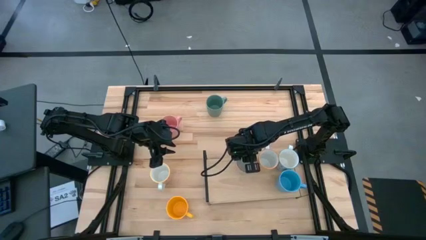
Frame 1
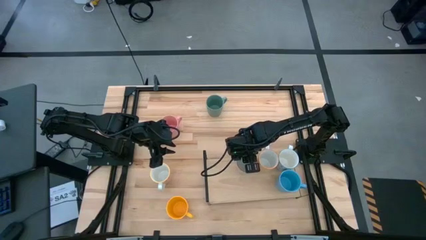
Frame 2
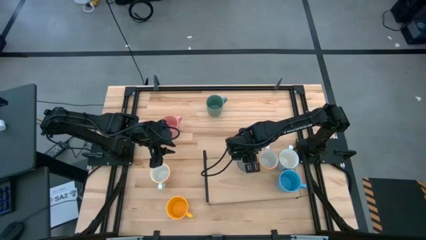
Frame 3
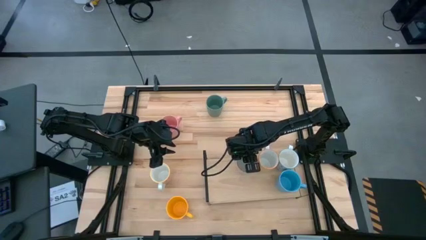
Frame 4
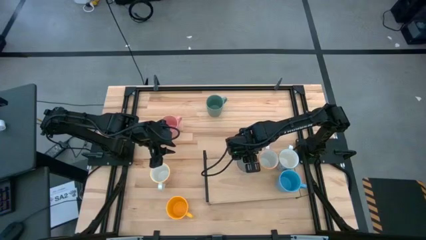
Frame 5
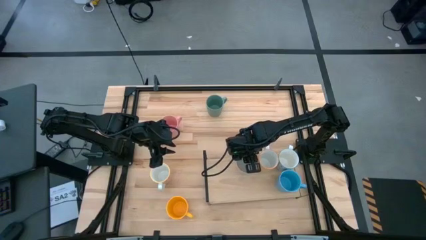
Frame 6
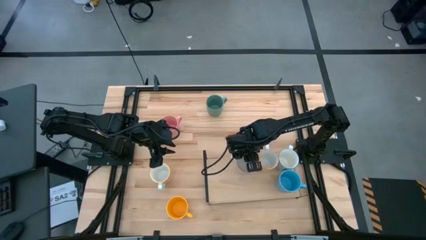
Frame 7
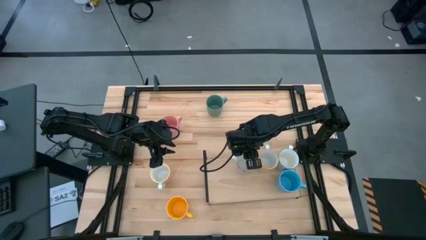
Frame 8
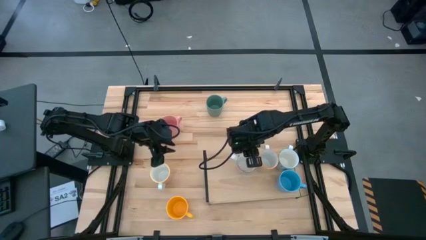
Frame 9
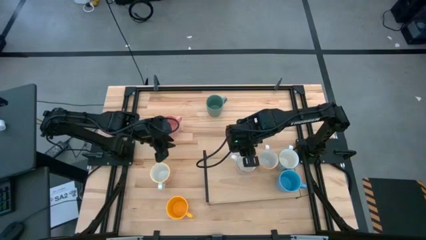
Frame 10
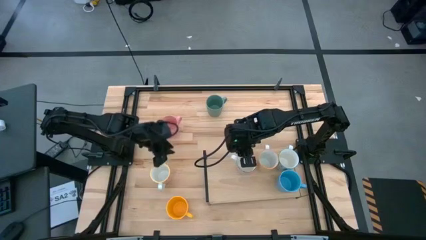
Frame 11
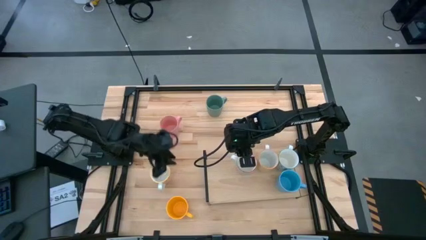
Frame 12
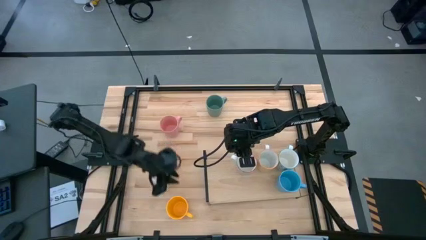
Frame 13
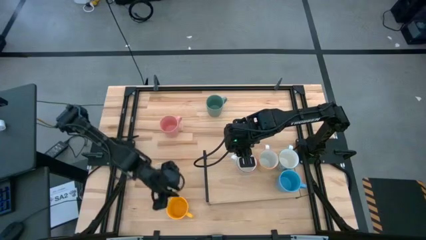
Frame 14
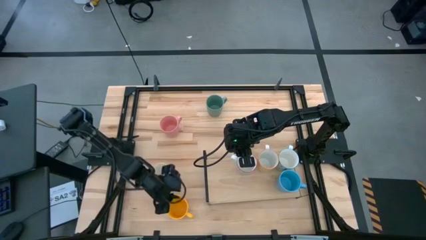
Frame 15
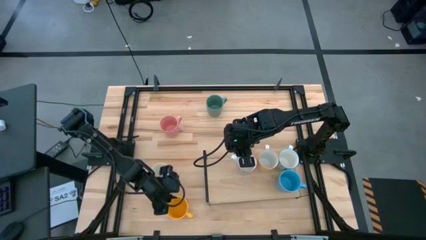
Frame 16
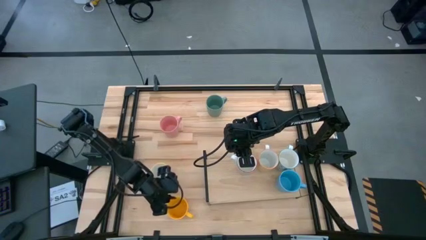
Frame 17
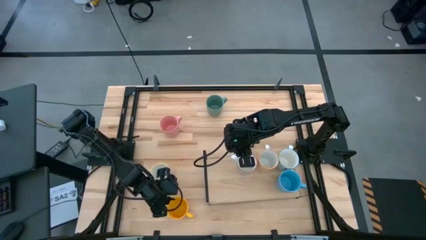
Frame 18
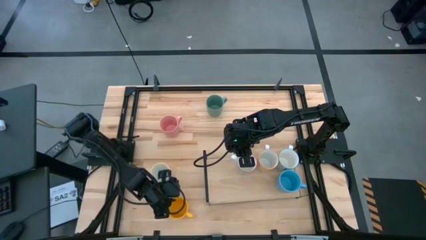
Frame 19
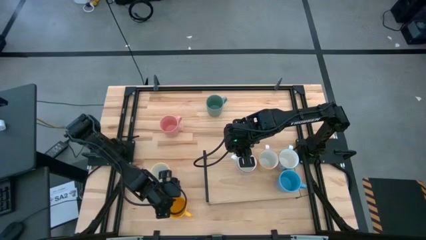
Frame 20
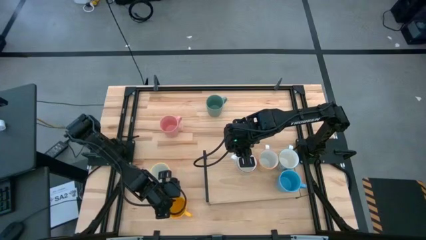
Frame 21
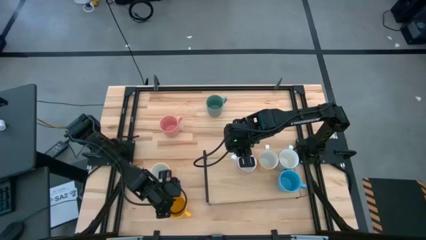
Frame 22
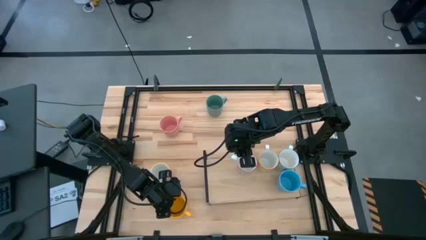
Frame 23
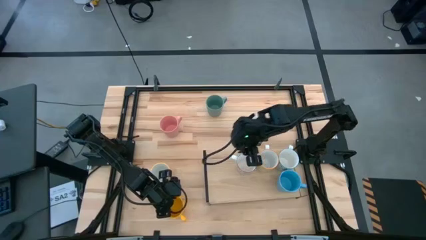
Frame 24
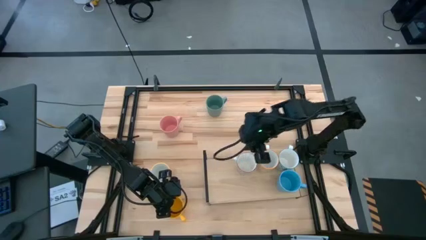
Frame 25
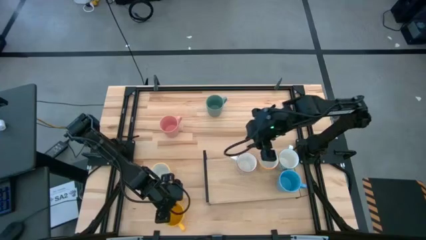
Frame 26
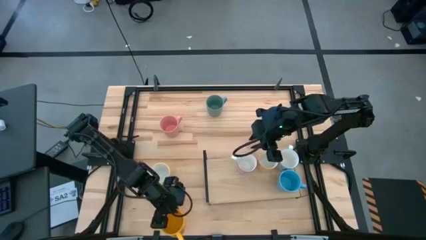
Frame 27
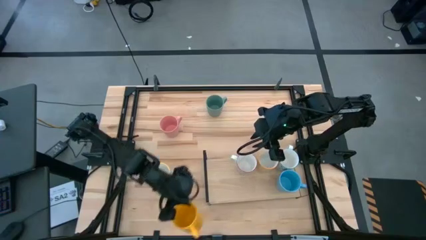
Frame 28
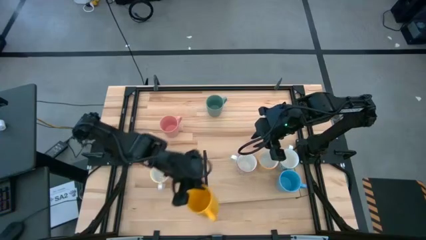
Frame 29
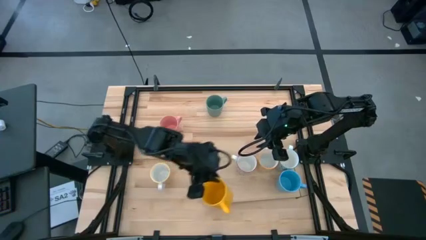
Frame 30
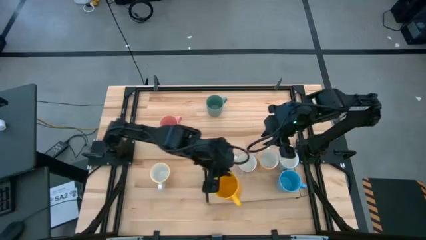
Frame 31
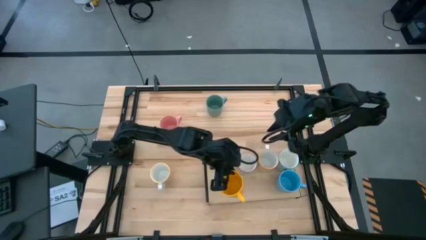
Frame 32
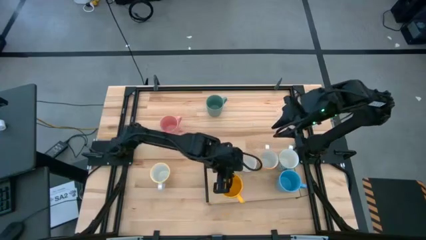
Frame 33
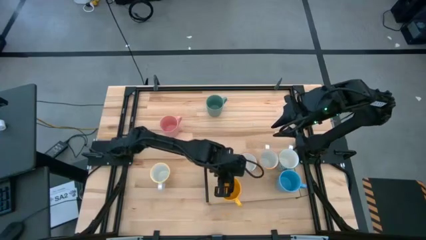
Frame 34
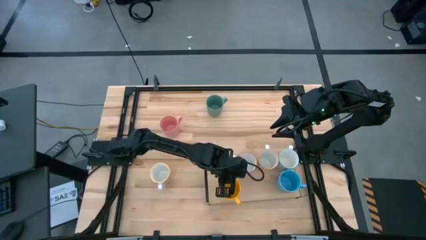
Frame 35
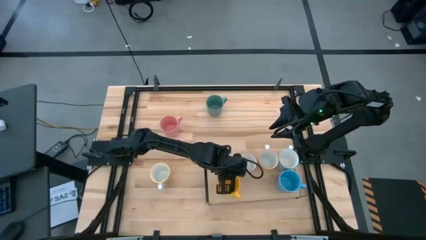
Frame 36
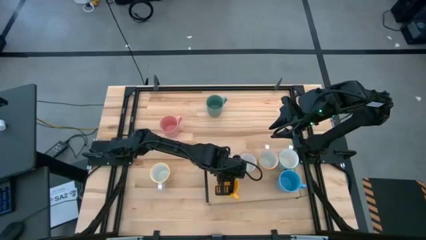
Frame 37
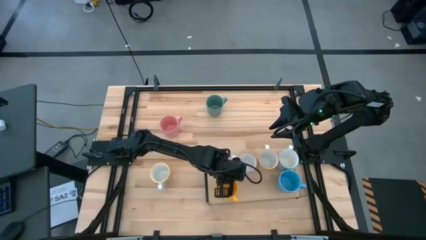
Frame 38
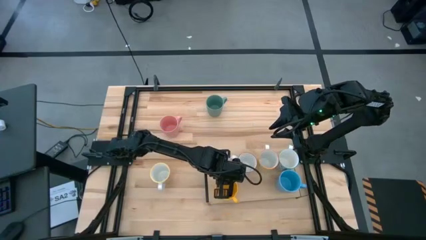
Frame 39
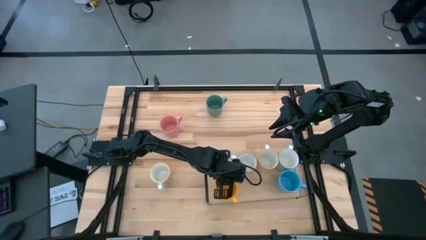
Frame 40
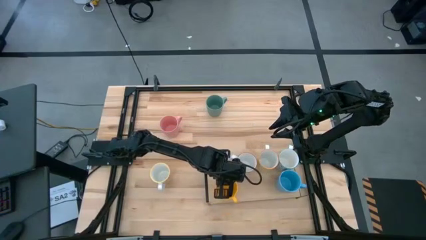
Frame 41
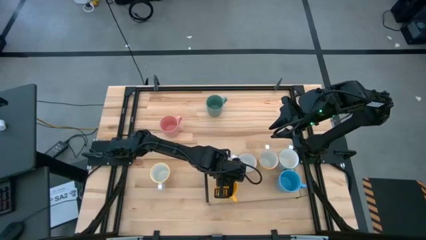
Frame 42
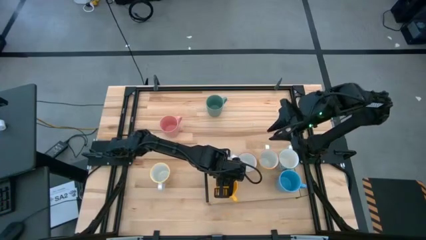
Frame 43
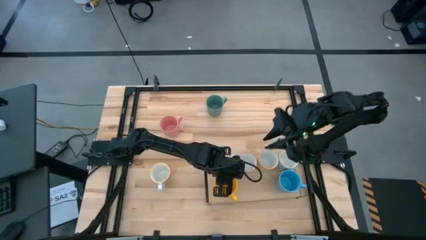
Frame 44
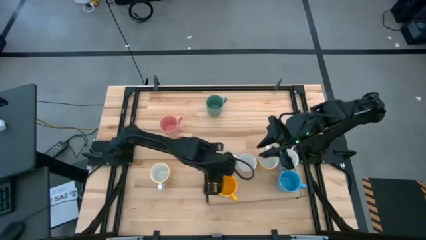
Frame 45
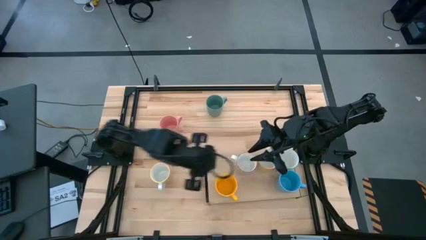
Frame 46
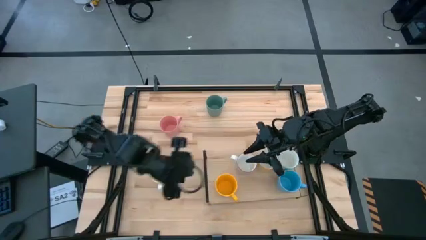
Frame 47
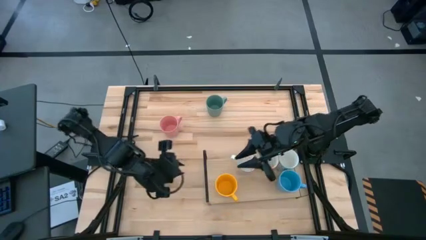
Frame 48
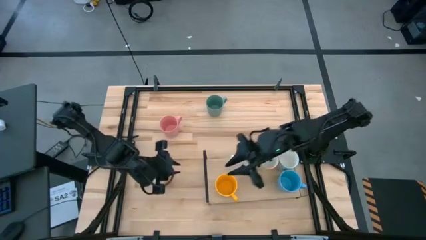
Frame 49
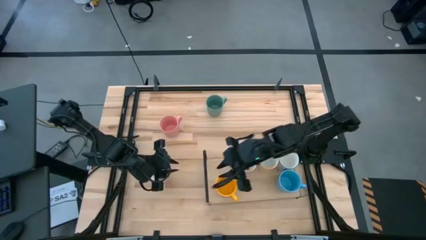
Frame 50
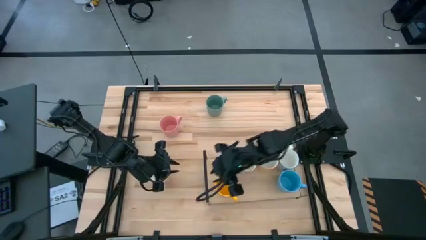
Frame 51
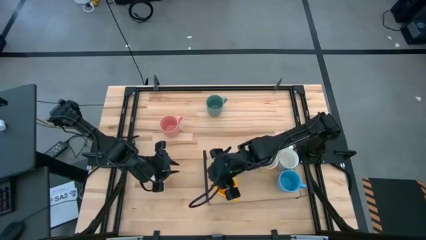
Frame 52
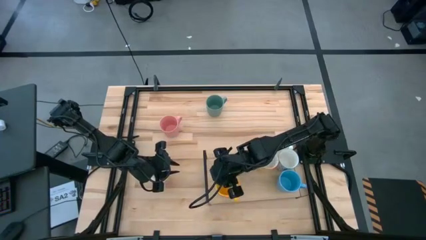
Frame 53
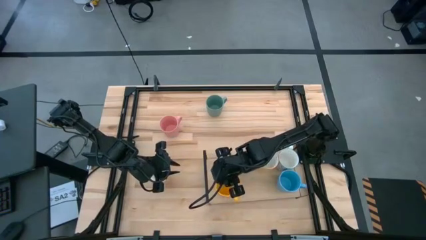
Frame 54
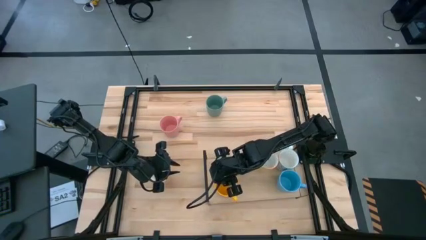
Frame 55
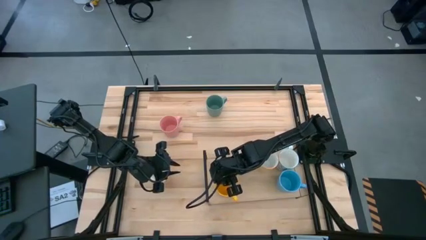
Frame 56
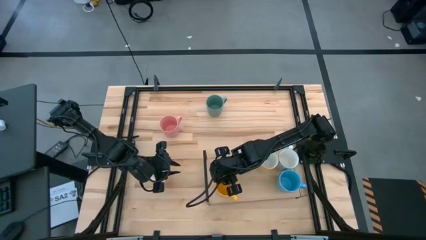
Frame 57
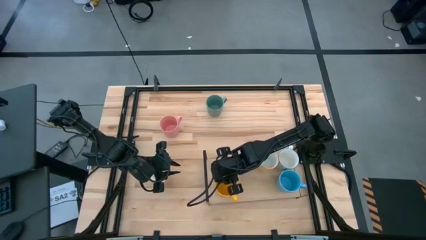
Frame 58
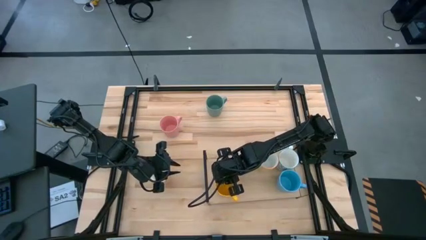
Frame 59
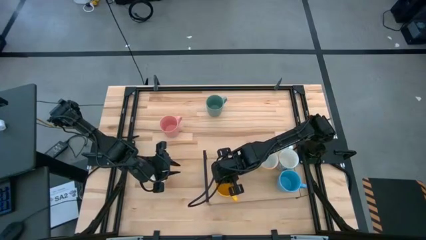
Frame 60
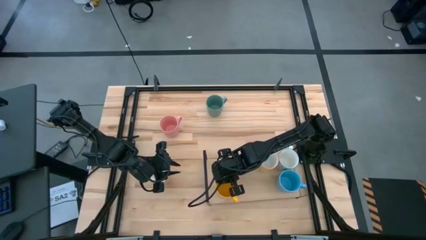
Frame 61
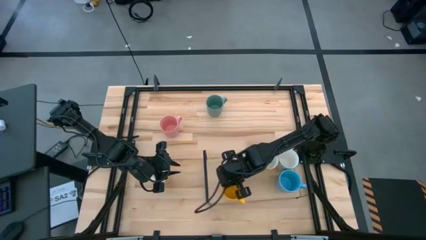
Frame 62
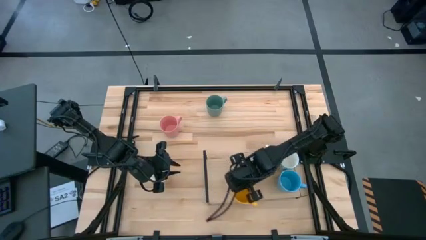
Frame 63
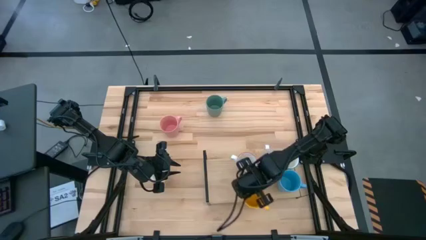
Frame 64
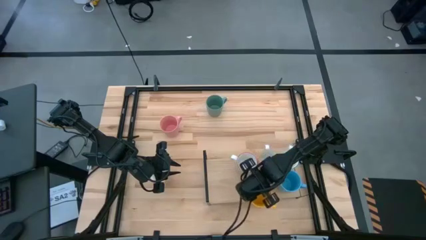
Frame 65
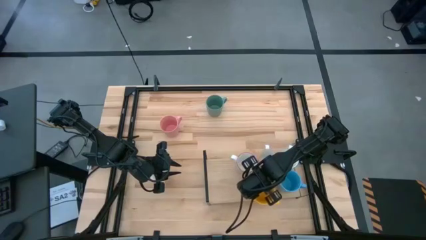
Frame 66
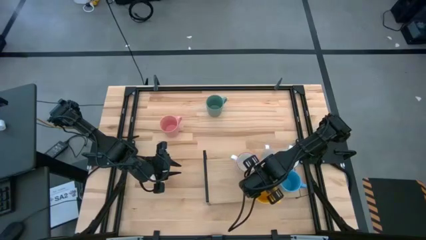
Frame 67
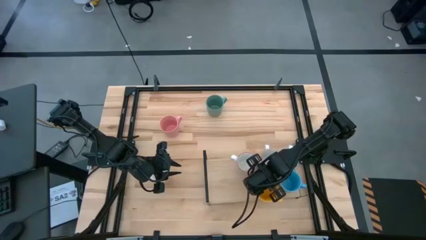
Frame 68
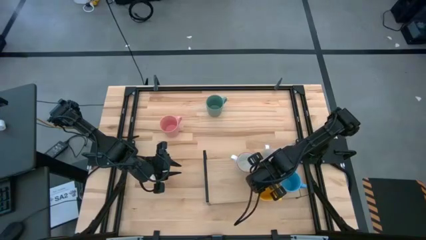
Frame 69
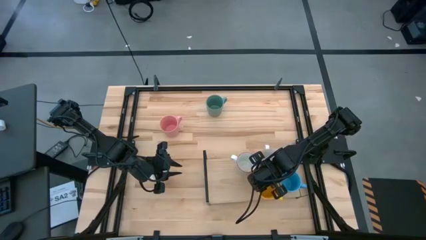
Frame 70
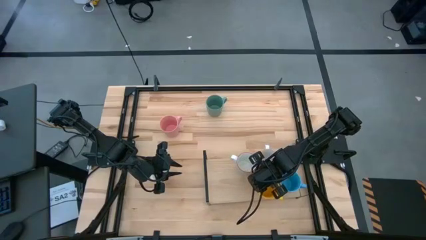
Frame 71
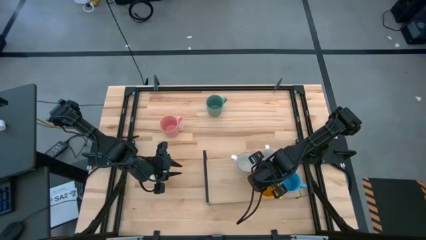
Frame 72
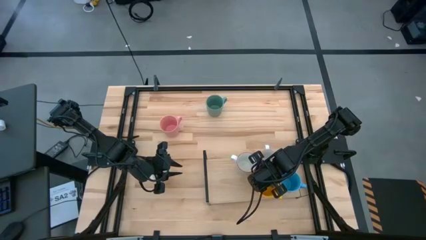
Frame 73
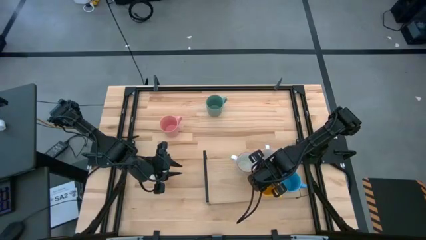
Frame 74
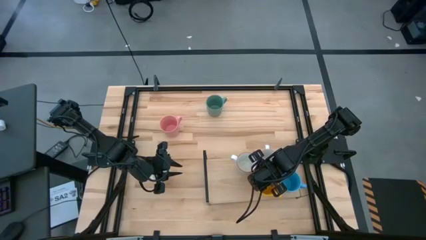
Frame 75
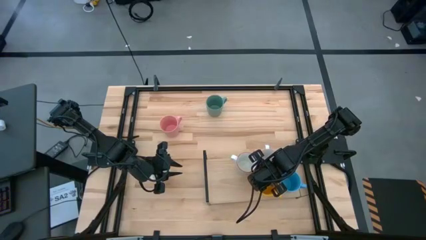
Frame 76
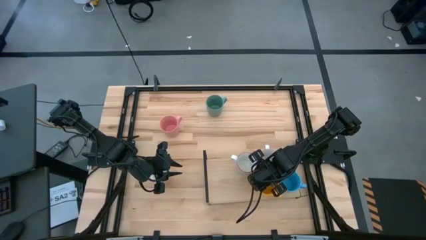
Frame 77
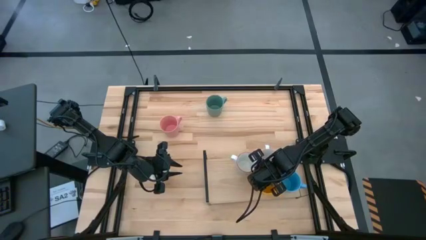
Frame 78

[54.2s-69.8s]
Task: Place coffee mugs
Put the yellow mug on the shelf

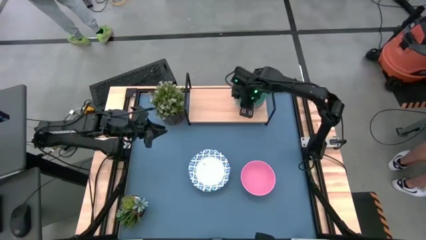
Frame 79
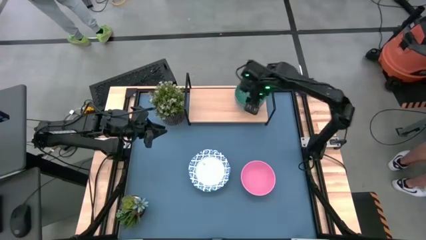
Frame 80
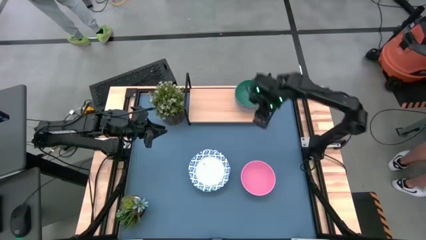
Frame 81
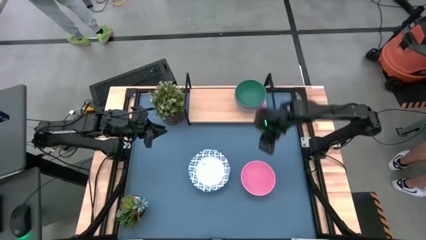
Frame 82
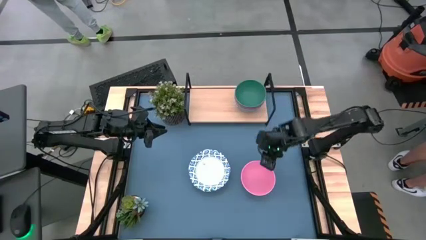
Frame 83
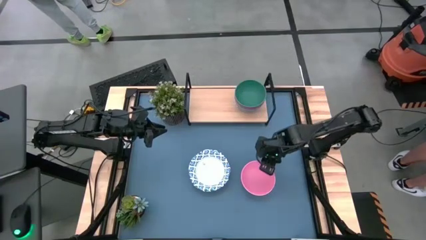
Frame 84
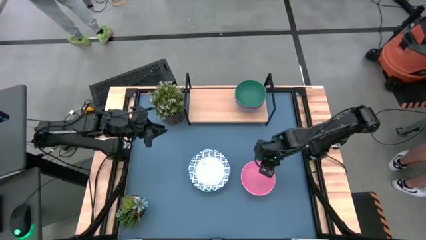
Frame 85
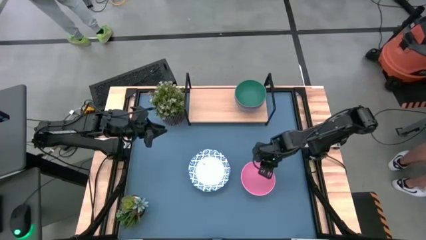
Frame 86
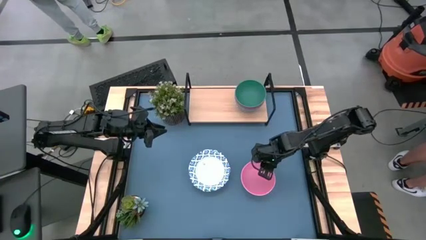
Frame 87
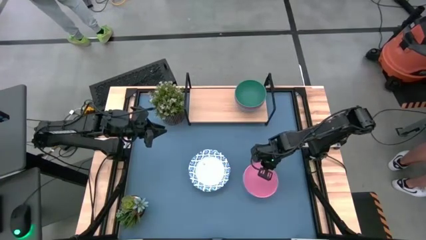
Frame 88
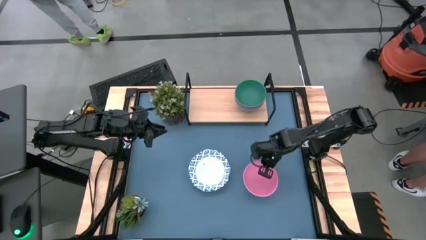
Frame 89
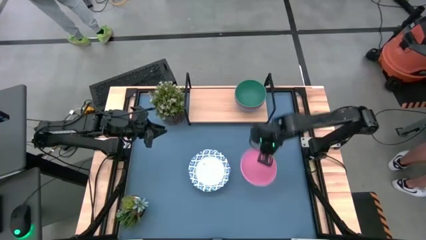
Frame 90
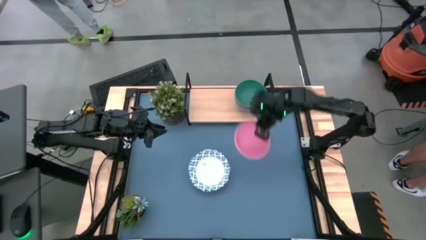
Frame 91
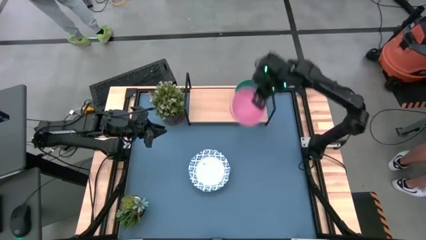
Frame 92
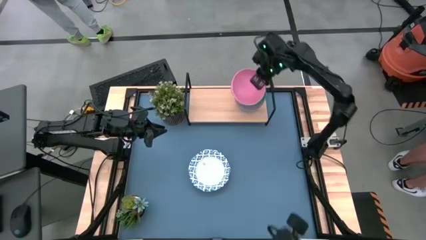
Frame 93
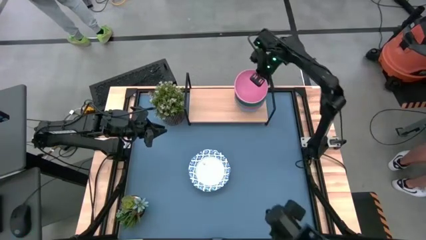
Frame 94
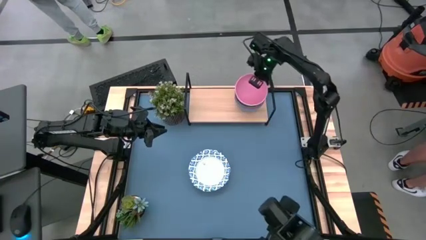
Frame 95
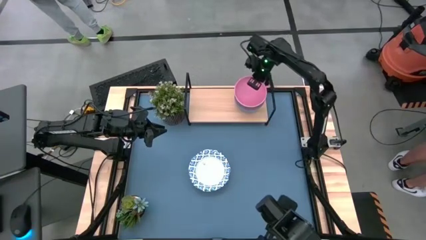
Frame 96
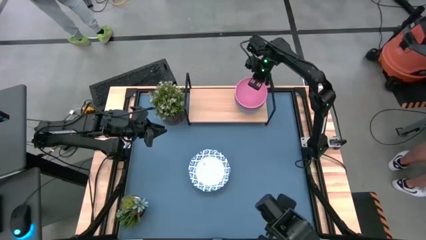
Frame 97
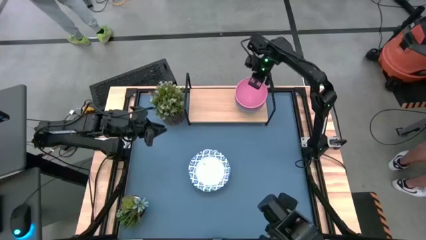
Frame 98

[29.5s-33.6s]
Task: Place and stack bowls onto a shelf
Stack the pink bowl on top of the green bowl on the shelf
